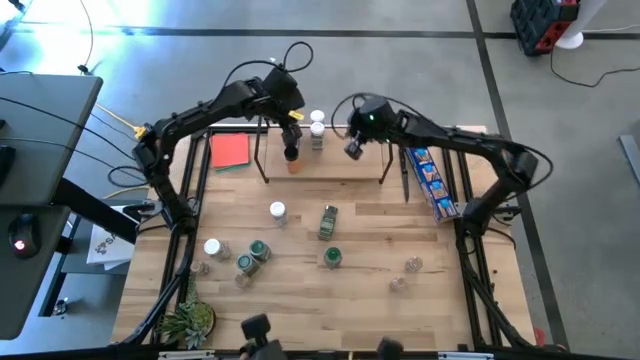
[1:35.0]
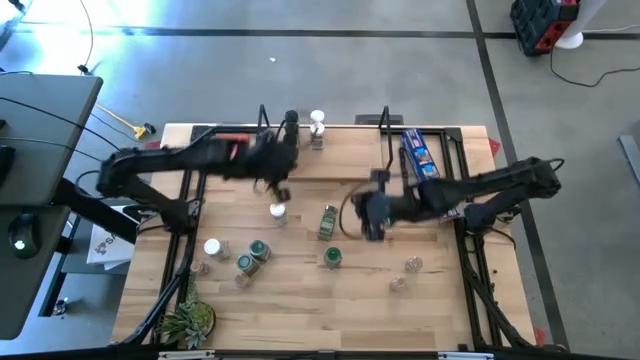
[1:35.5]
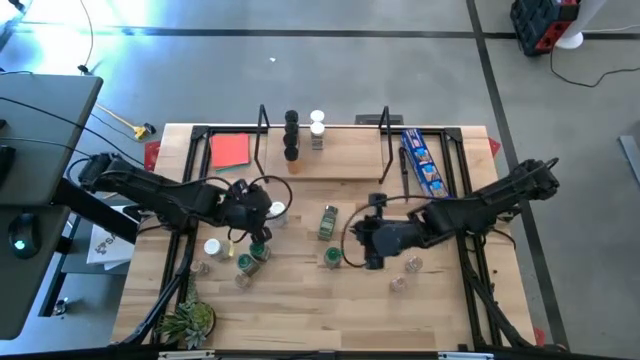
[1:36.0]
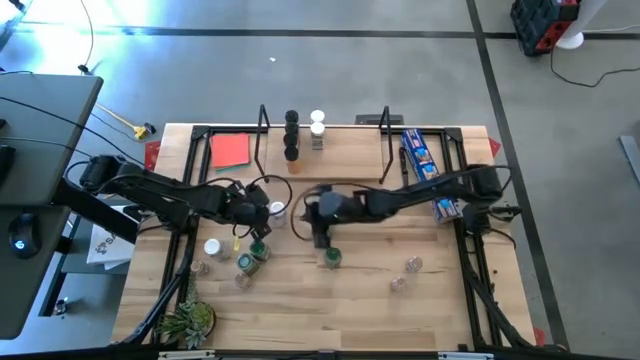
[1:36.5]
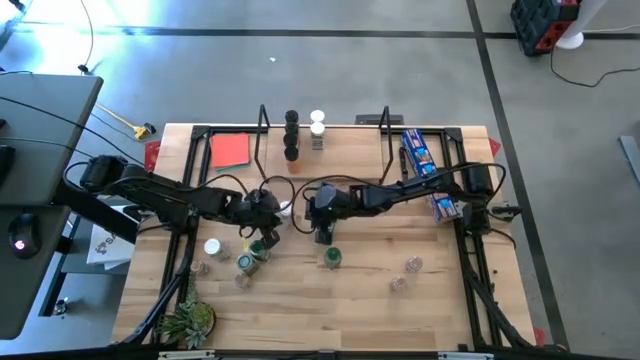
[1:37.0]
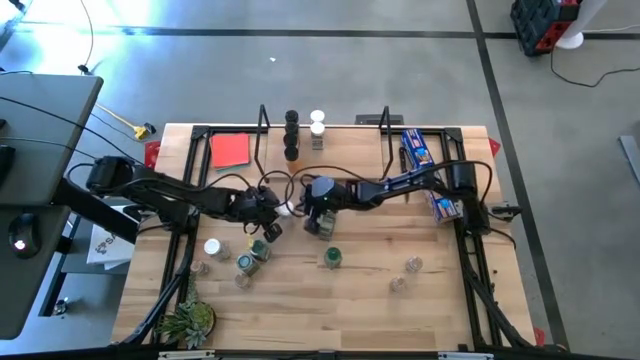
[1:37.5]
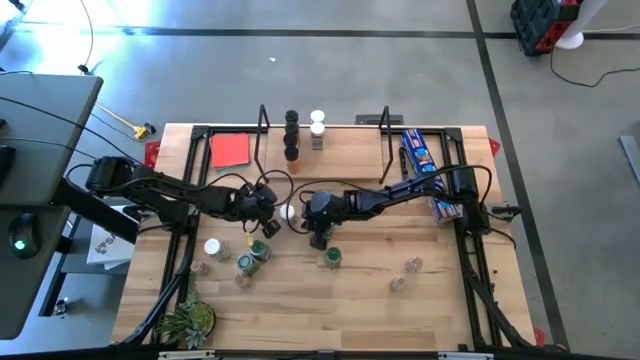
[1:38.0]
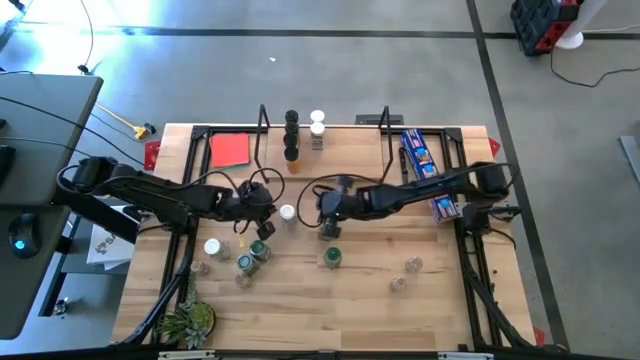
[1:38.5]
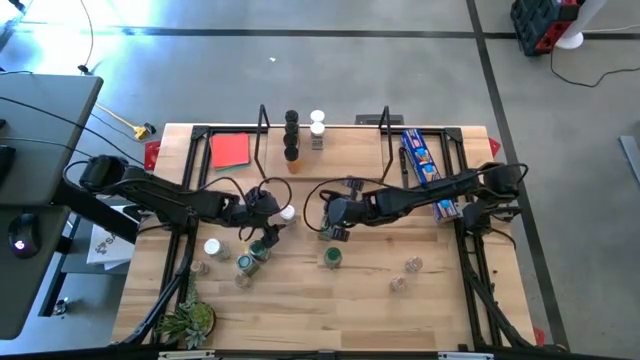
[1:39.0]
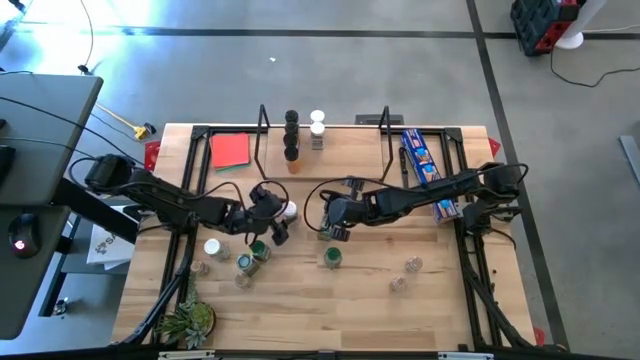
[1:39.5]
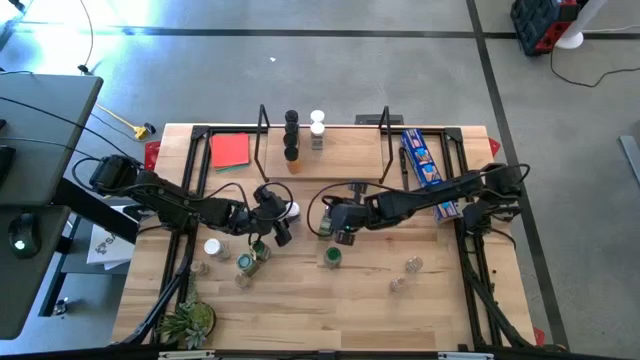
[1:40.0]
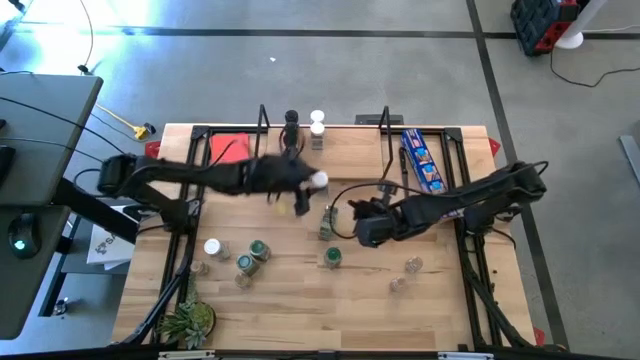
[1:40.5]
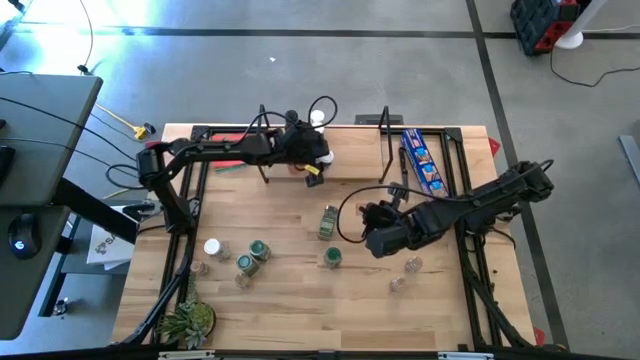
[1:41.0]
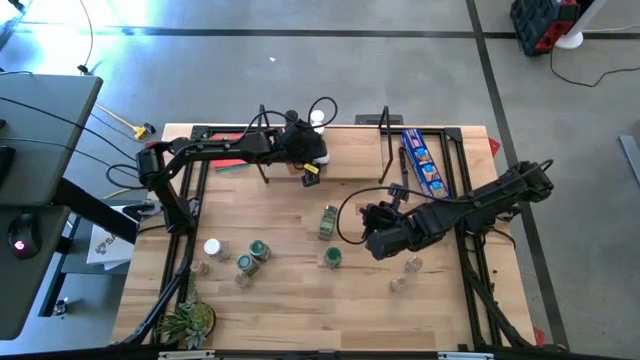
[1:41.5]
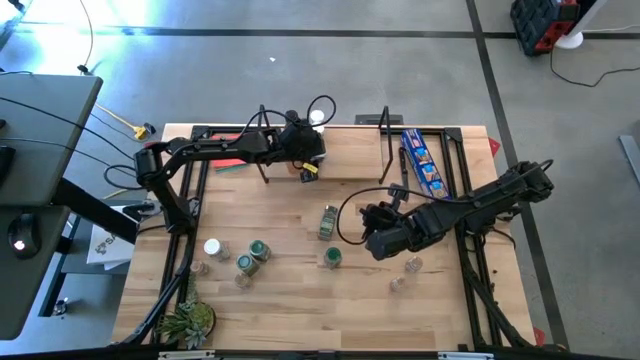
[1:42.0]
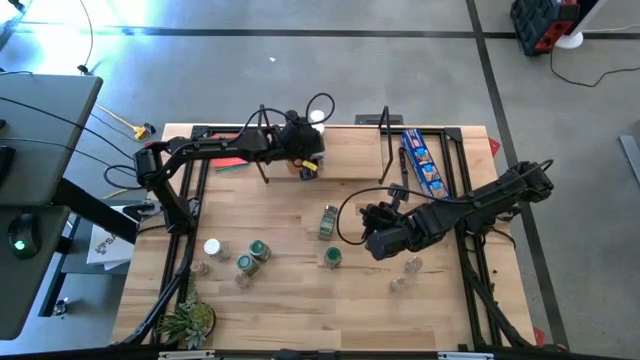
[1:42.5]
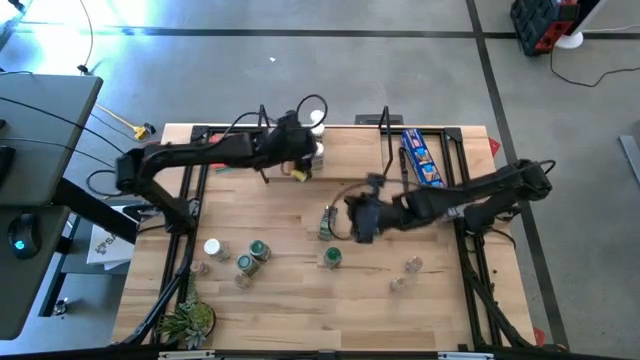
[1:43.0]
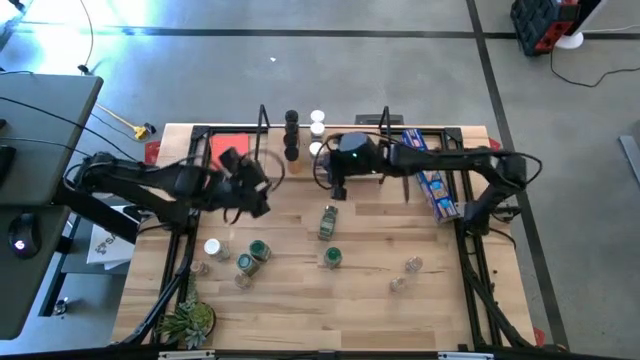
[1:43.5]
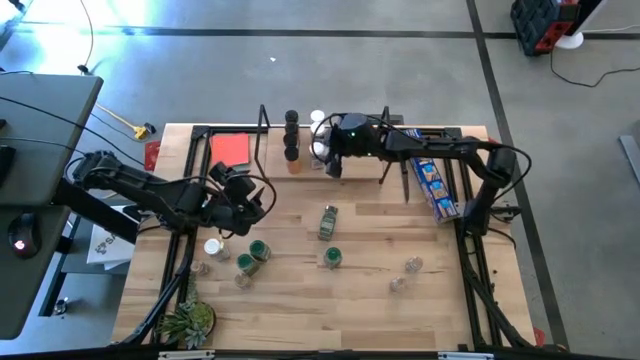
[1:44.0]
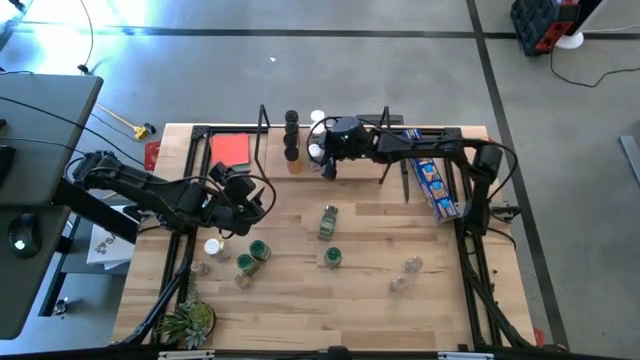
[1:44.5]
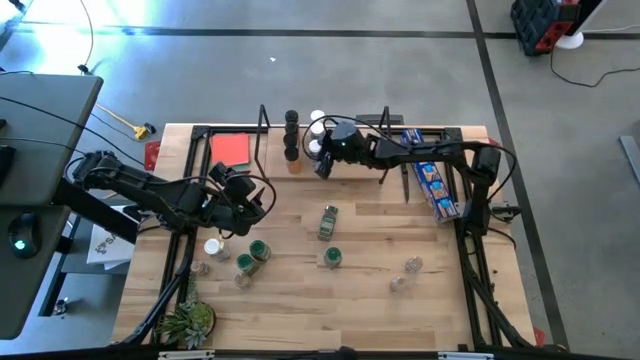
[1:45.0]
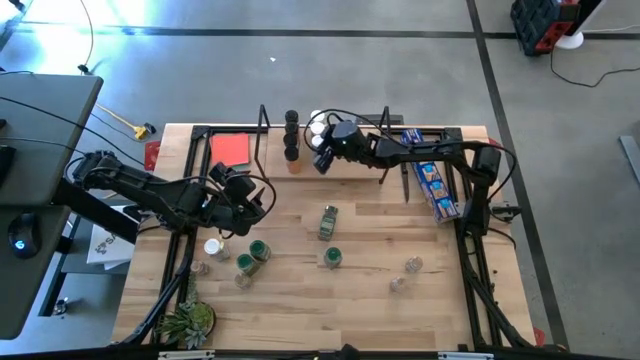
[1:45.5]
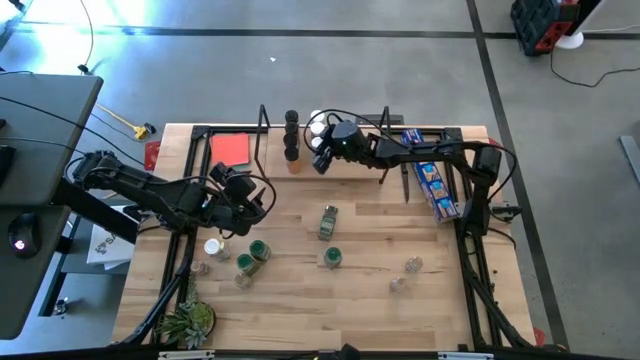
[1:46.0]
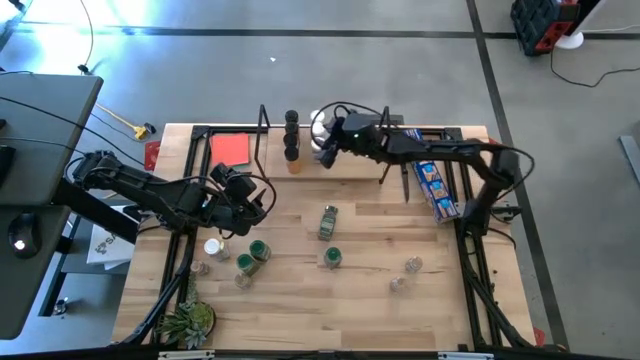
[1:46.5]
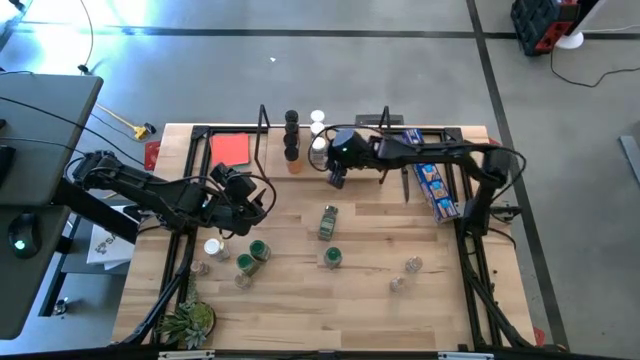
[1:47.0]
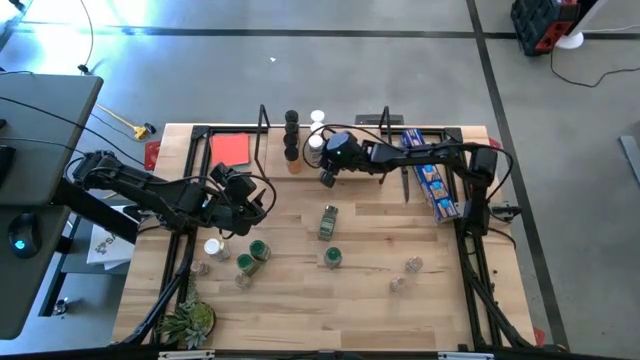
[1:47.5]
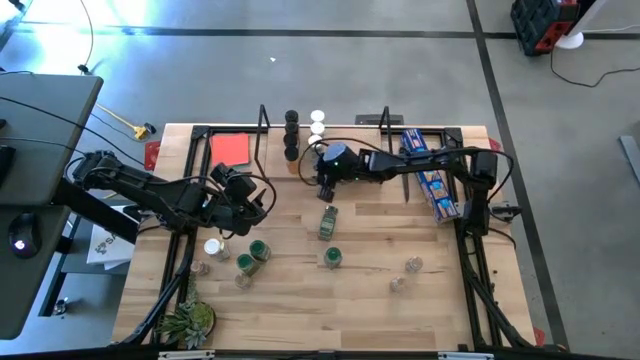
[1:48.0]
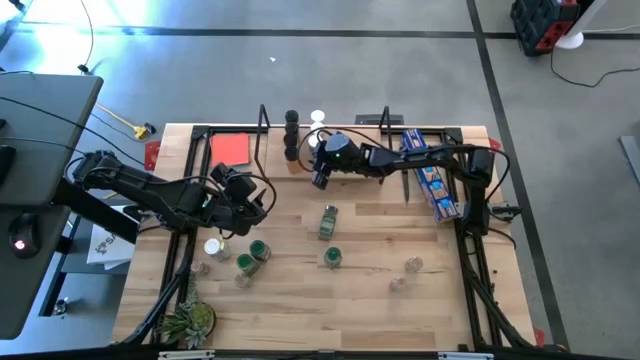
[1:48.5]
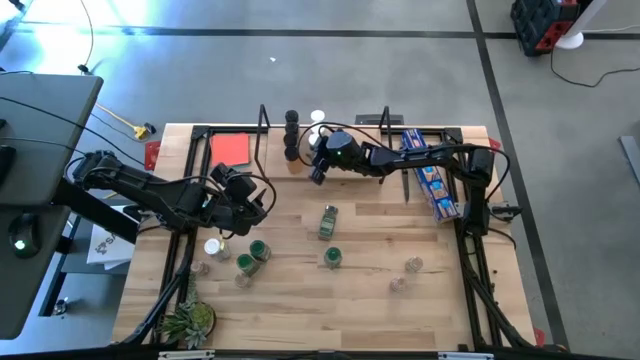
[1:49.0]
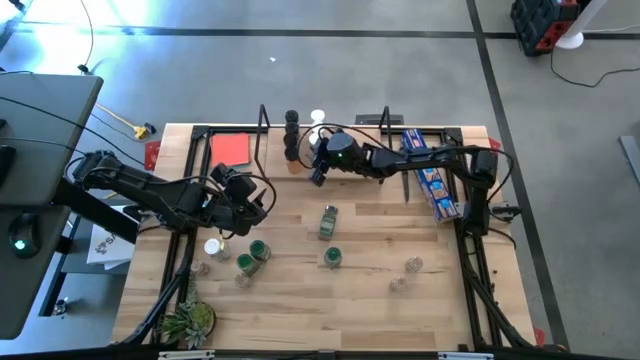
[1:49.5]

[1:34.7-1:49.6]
Task: Shelf spices
Put the white seasoning bottle on the shelf aligned with the other white seasoning bottles

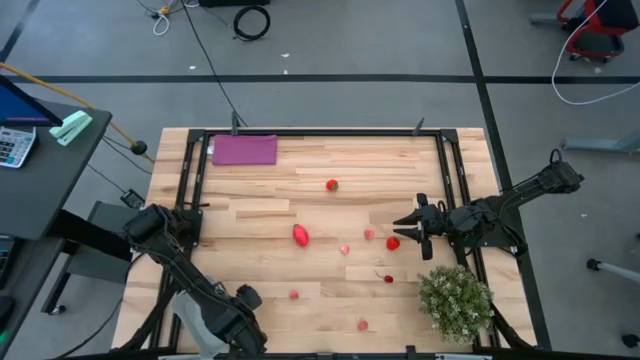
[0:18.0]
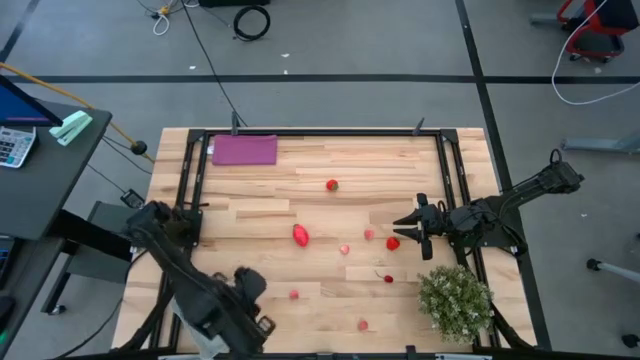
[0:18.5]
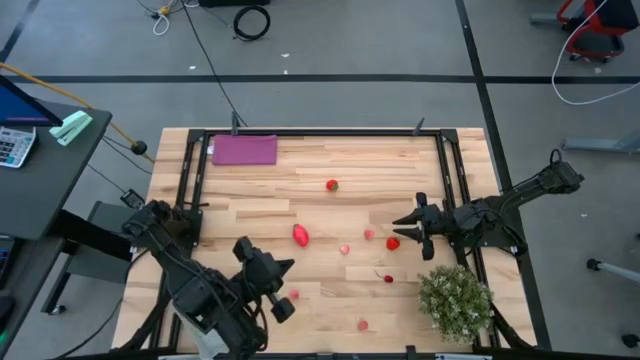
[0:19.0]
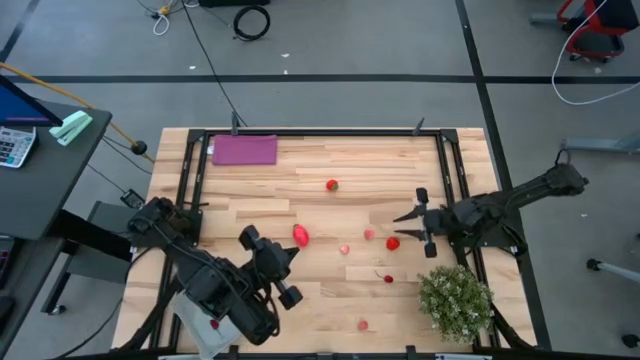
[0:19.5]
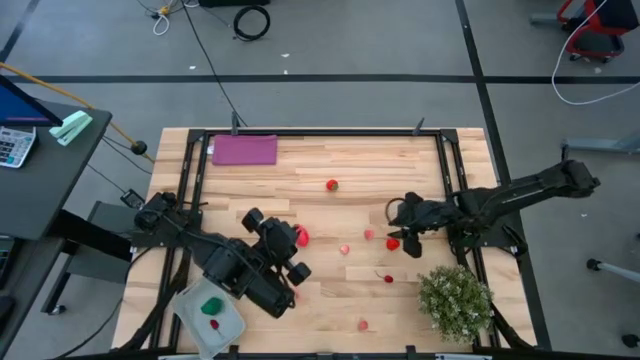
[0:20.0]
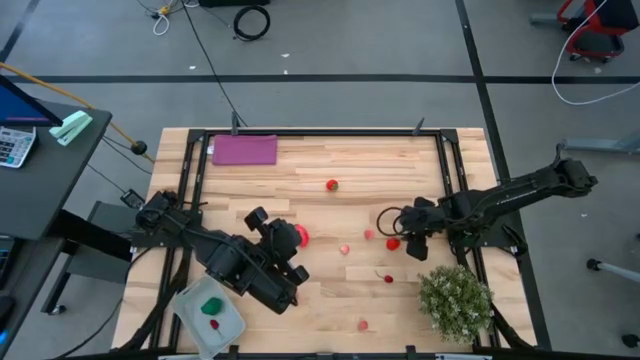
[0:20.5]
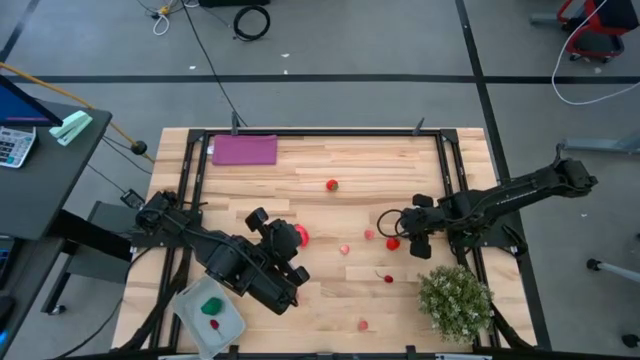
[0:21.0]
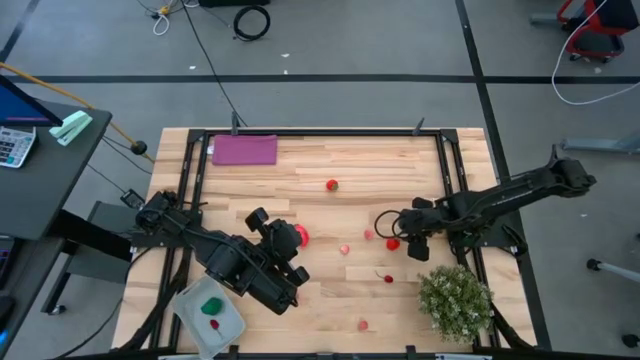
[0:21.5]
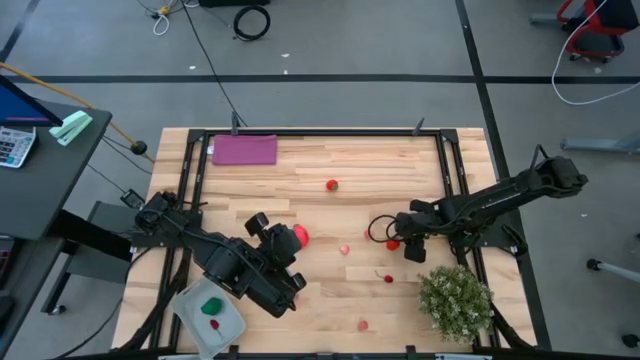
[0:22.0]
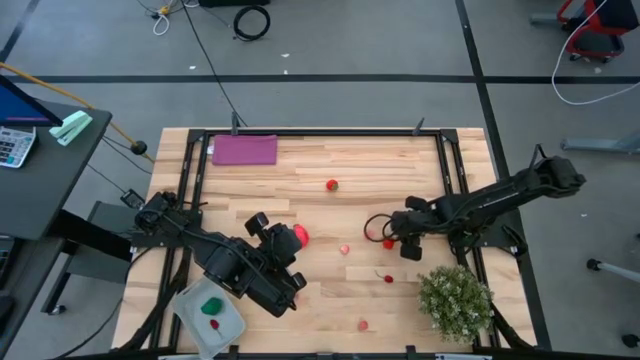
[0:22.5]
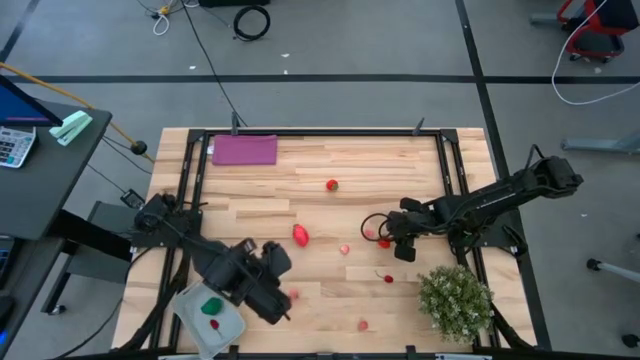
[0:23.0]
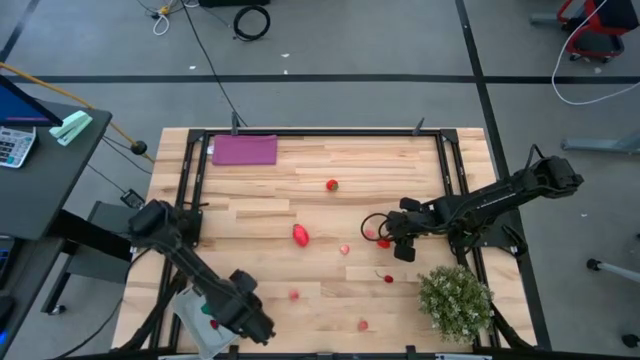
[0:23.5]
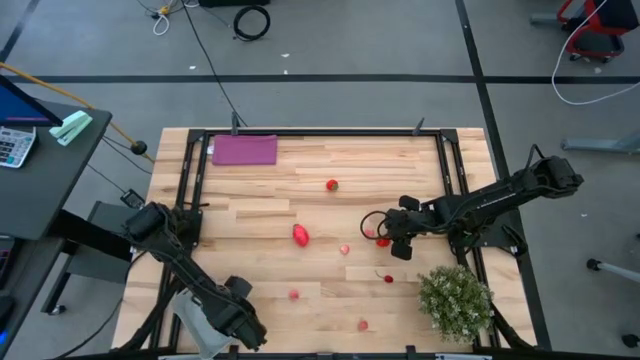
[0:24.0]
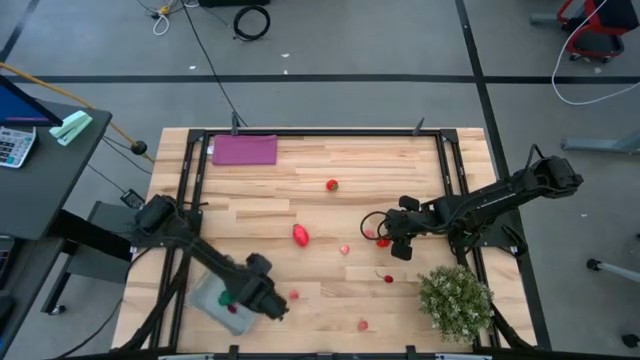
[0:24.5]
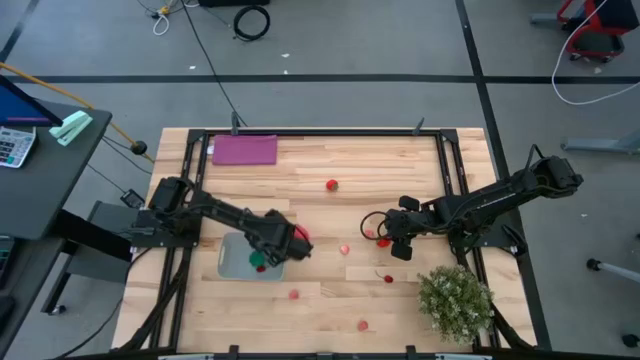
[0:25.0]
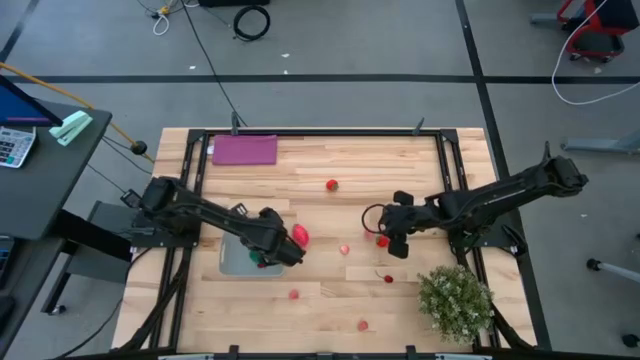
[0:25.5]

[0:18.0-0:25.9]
Task: Pick and placing Produce into tupperware
Move the gray container to the center left
